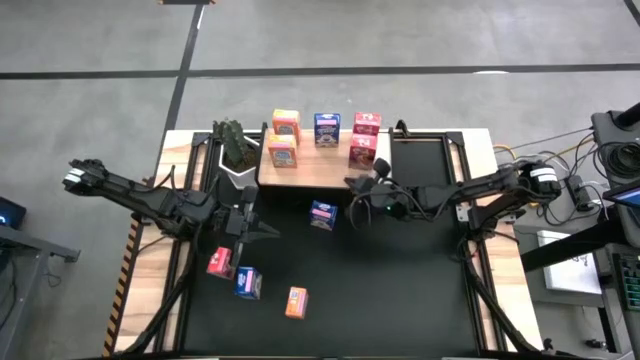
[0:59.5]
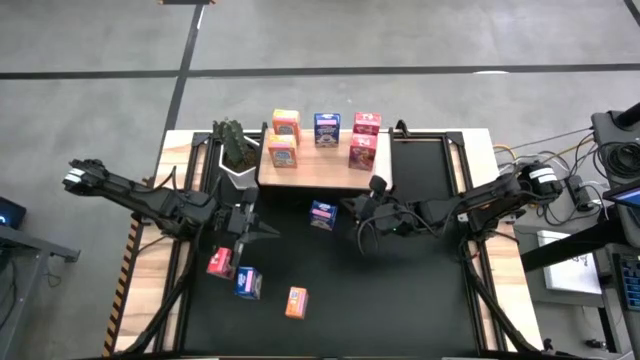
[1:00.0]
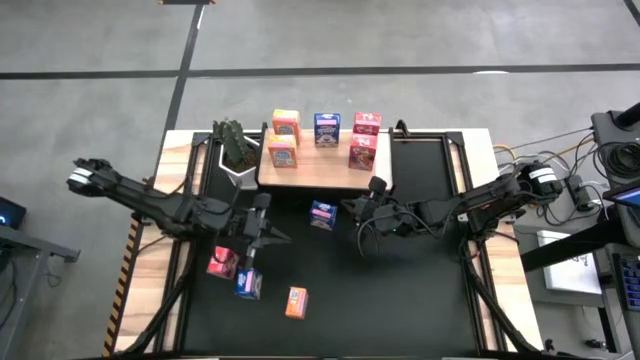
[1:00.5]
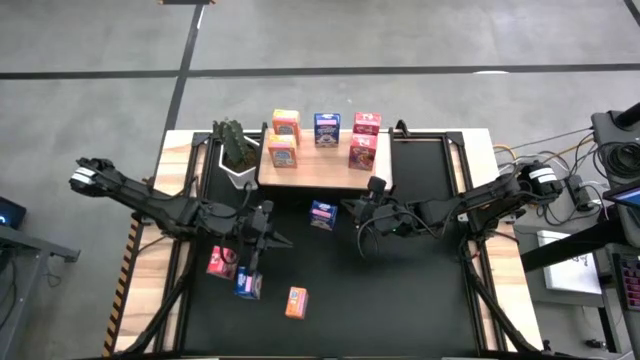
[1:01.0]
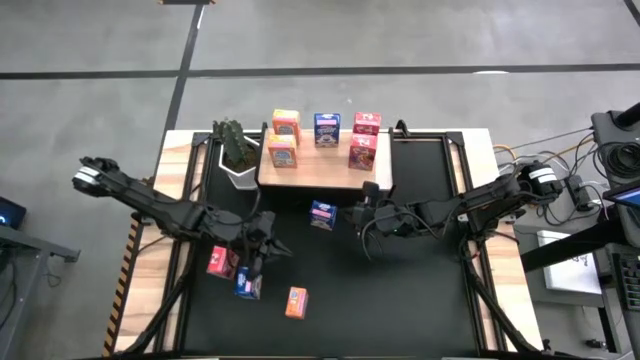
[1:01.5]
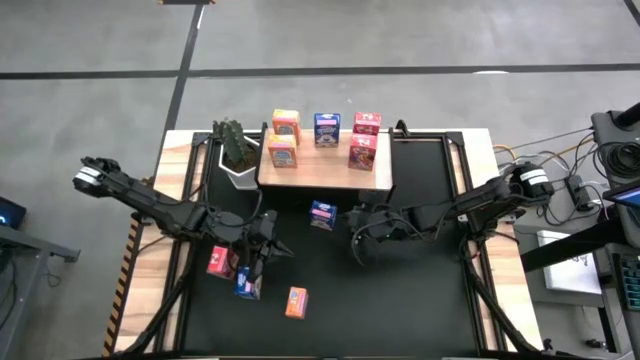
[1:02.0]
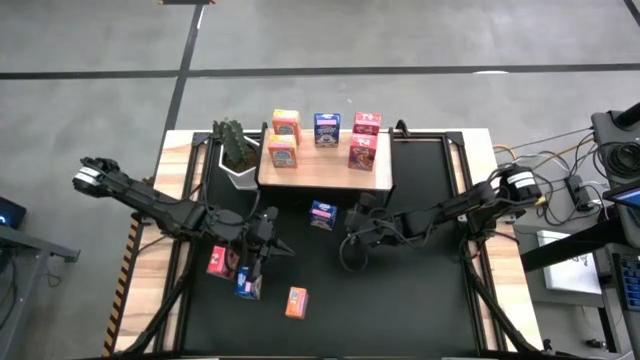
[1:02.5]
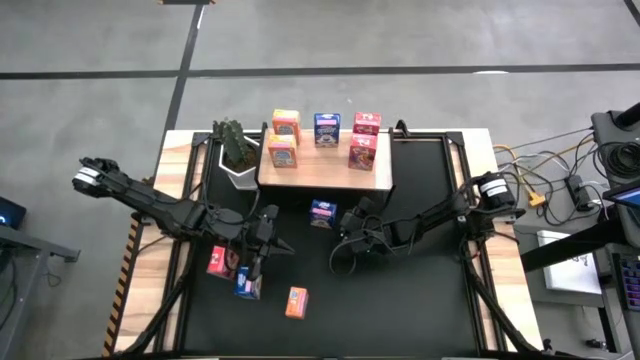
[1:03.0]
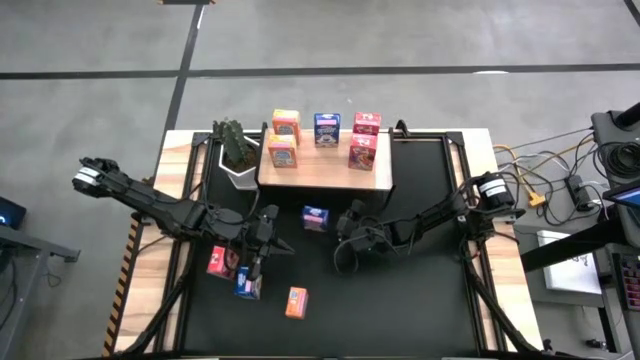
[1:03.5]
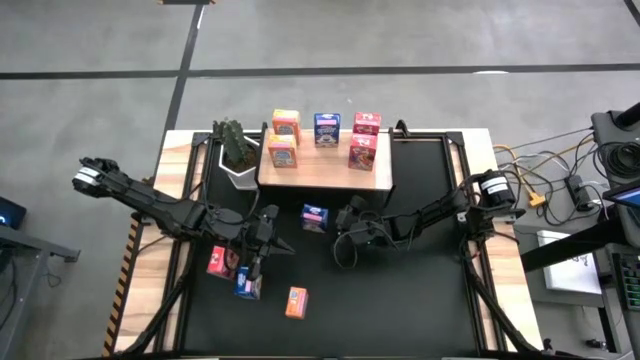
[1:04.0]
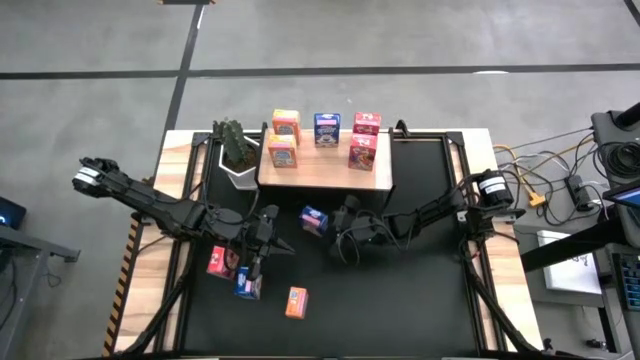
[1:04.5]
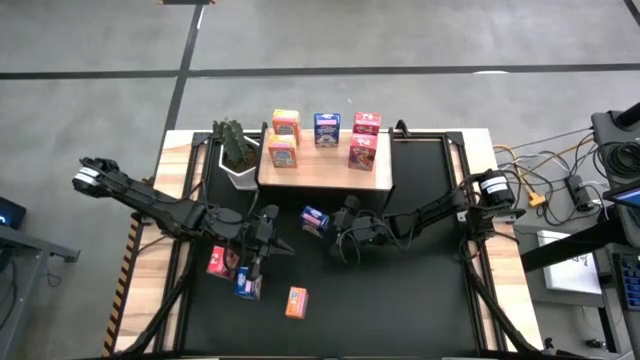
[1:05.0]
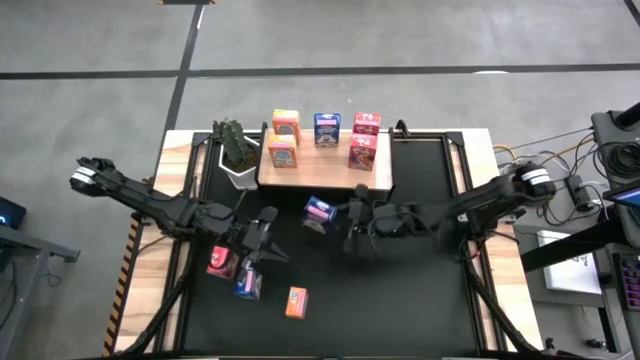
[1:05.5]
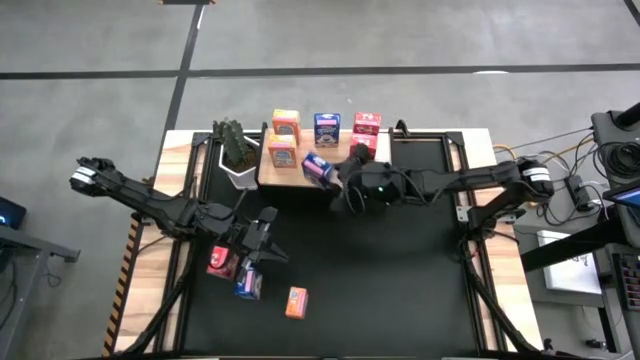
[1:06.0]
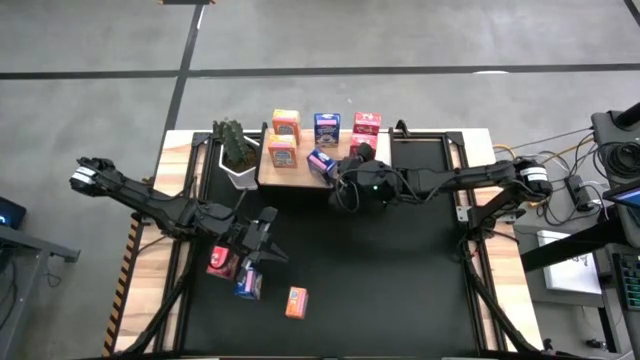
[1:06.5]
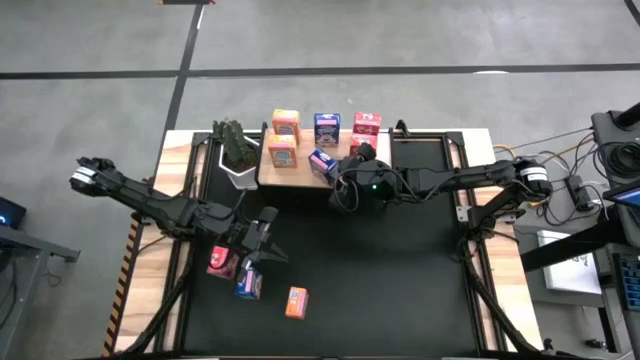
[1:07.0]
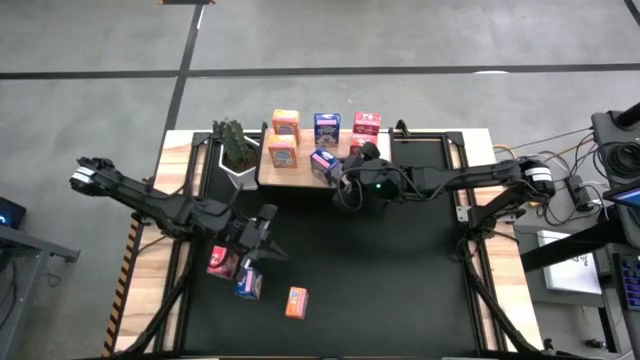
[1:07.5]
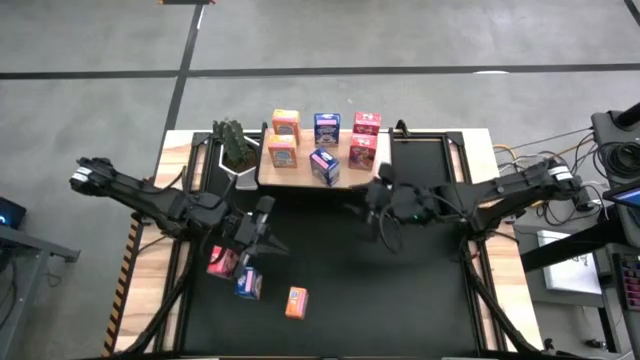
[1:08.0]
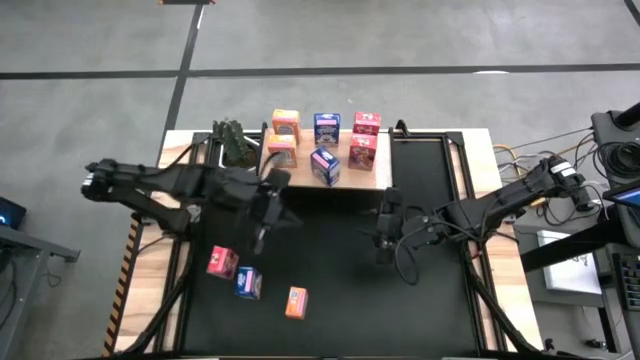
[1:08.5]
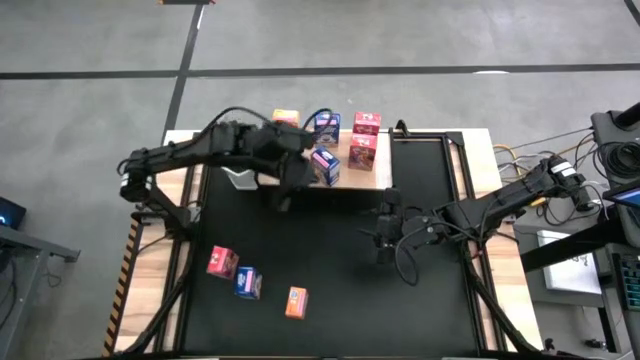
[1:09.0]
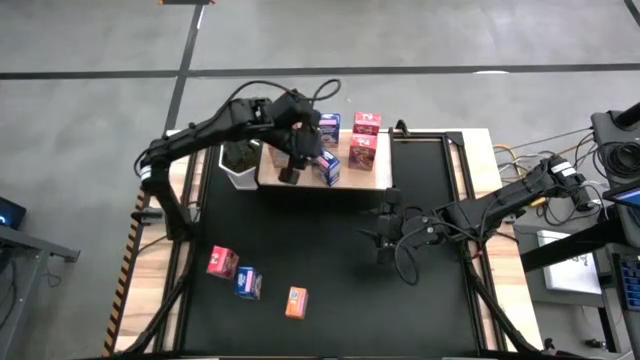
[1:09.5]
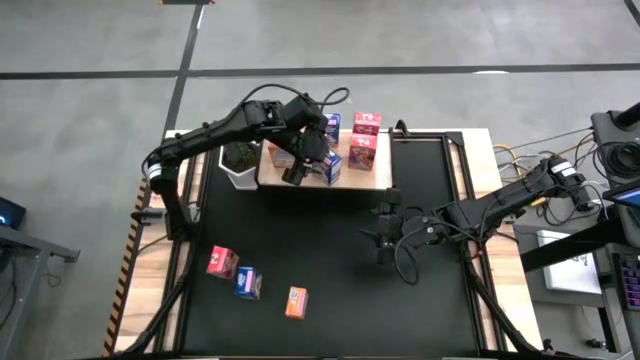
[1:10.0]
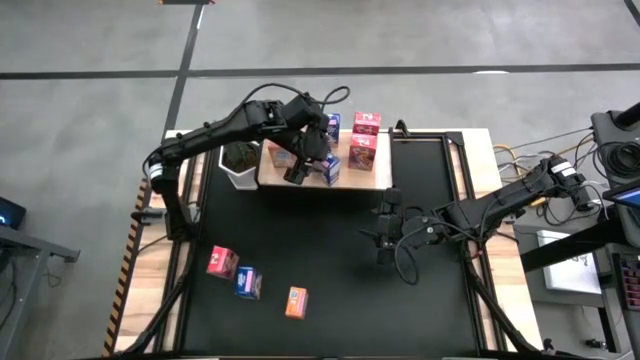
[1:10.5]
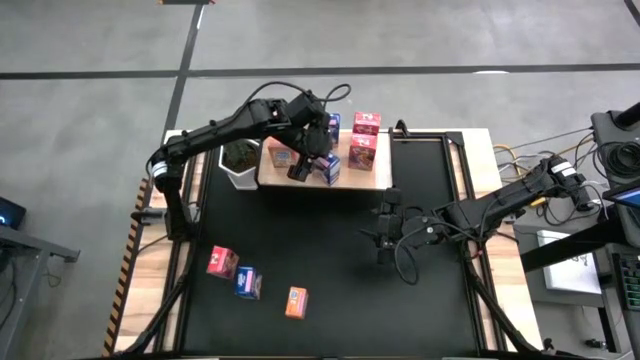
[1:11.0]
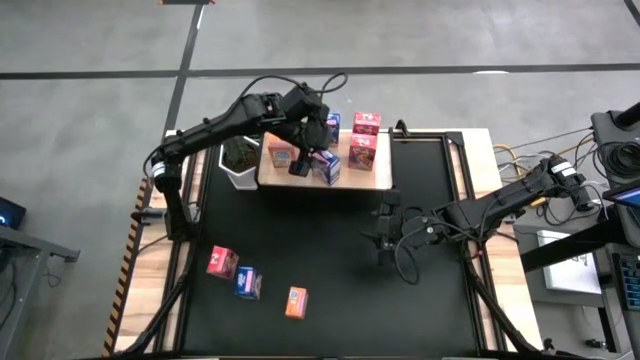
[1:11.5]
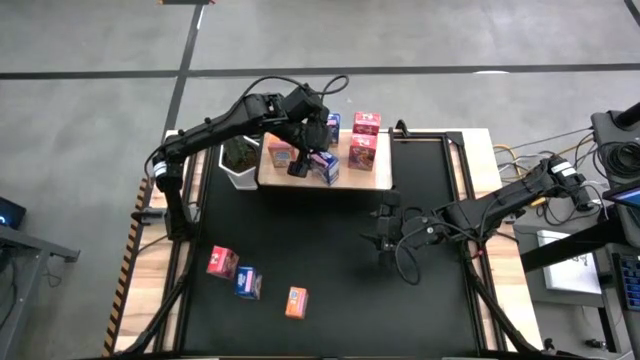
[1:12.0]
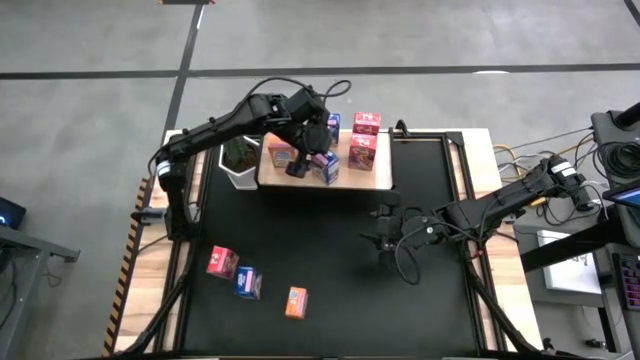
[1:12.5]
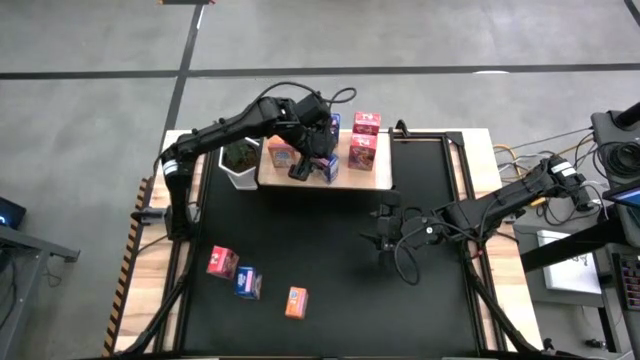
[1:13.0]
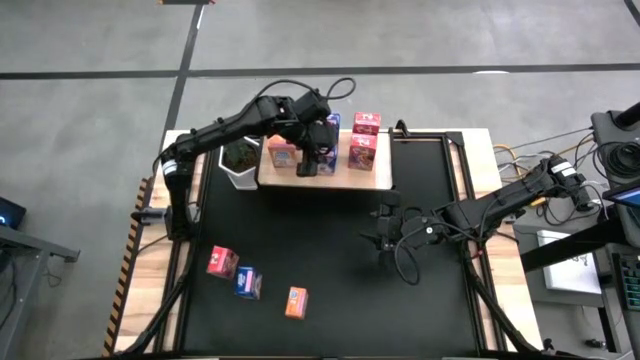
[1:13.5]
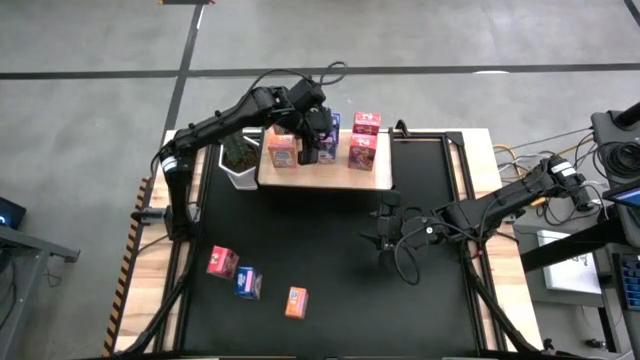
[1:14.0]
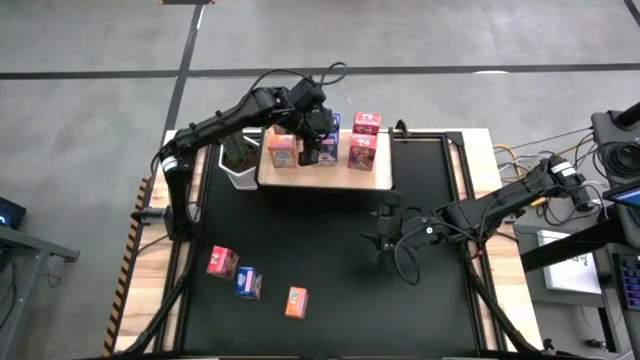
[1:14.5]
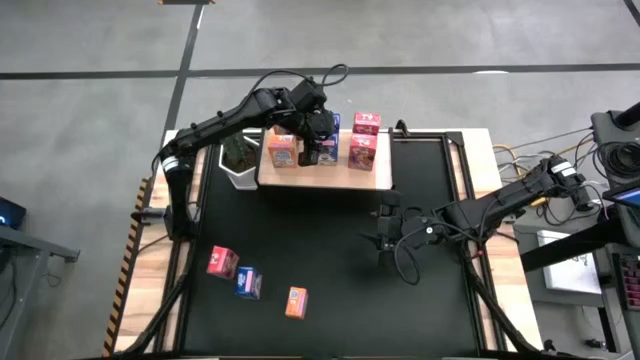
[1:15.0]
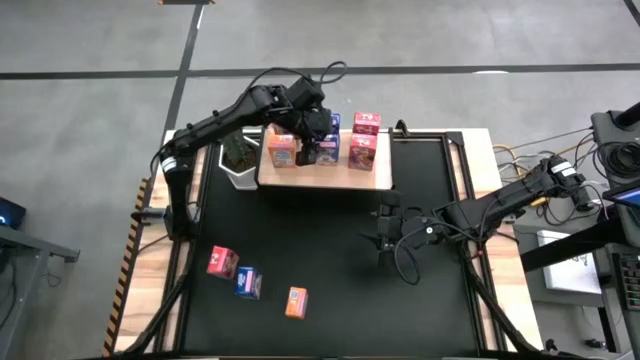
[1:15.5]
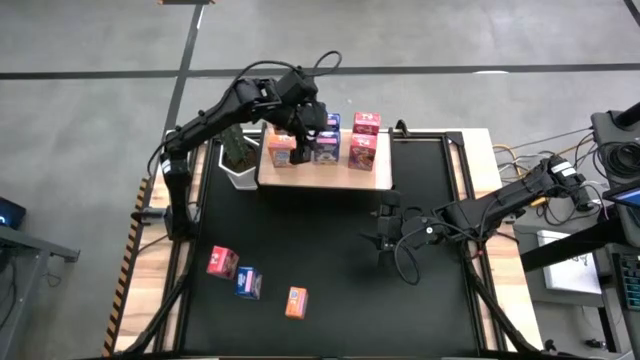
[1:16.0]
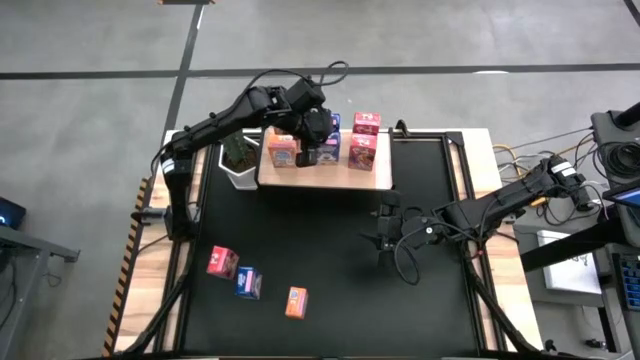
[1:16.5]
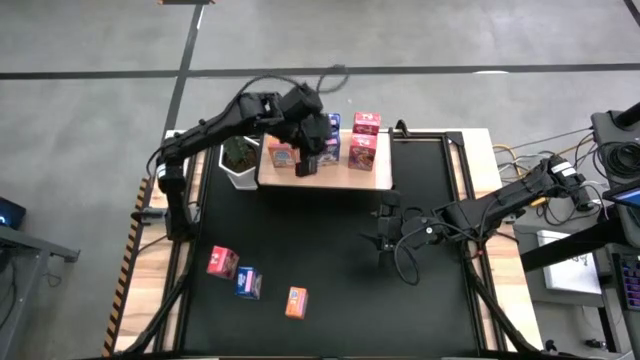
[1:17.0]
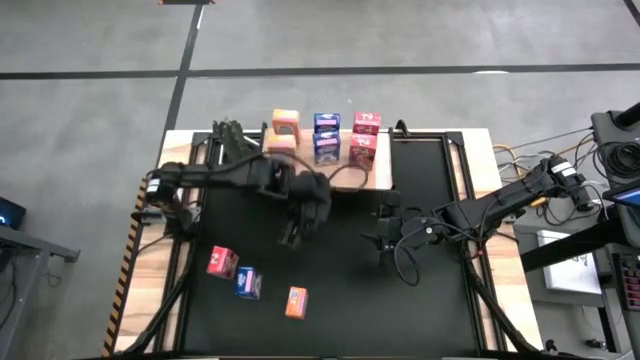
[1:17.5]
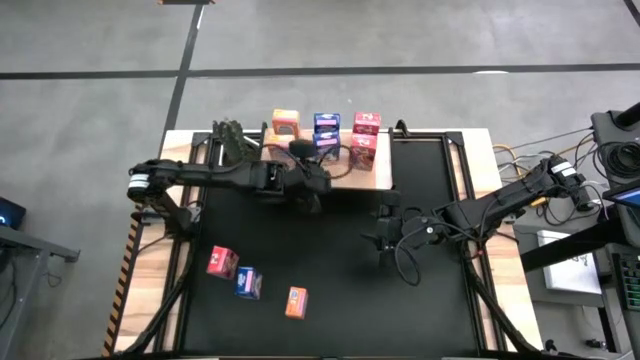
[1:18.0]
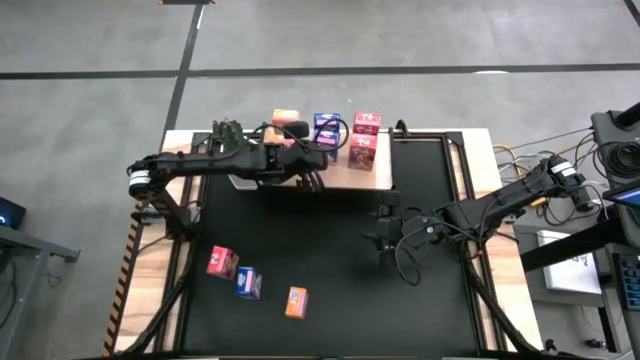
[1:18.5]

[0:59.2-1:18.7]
Task: Stack cereal on shelf
Put the top blue cereal box on the shelf aligned with the other blue cereal box

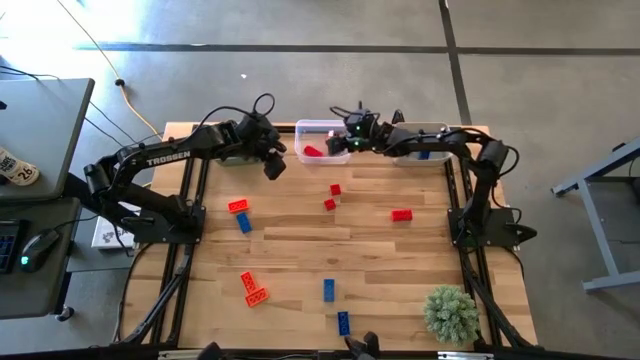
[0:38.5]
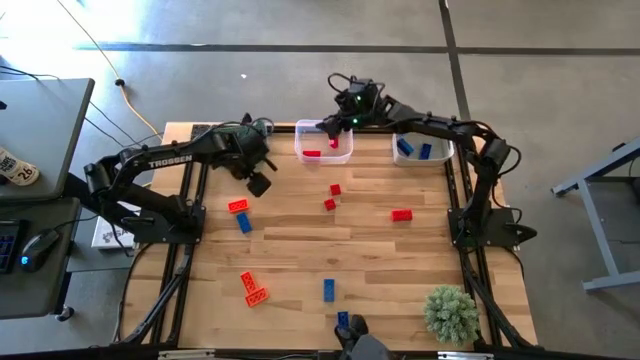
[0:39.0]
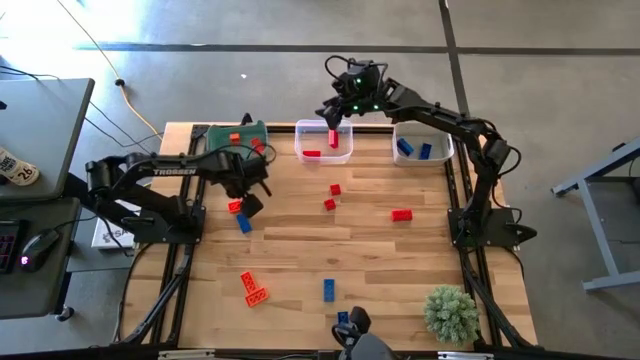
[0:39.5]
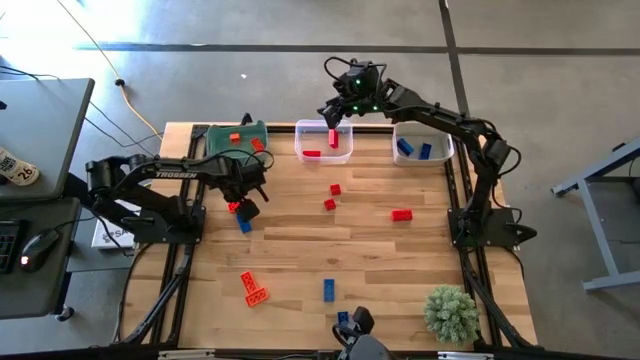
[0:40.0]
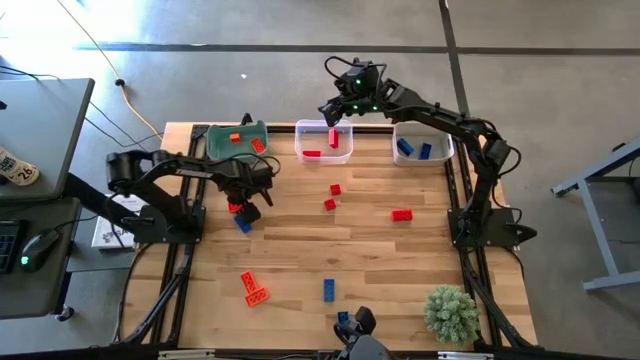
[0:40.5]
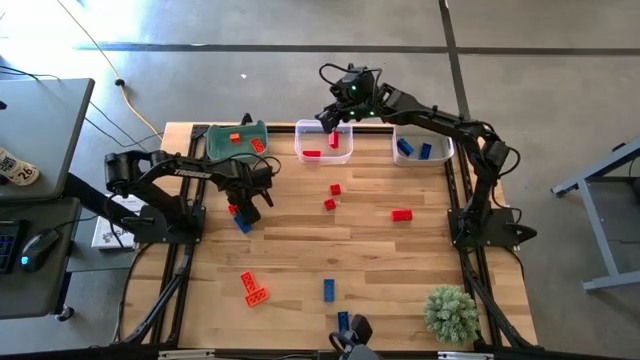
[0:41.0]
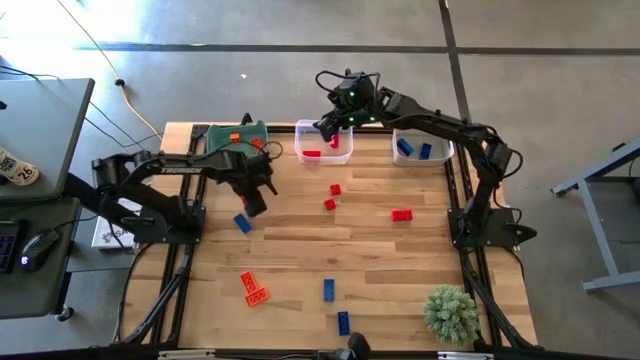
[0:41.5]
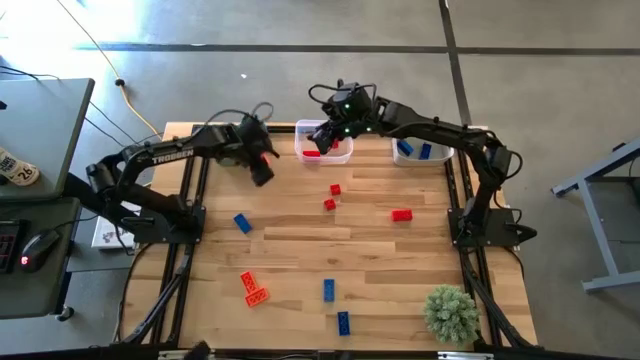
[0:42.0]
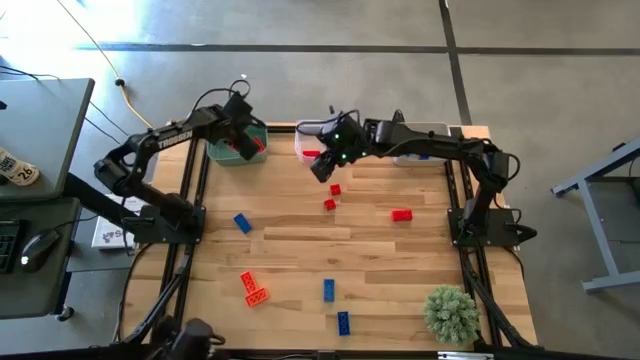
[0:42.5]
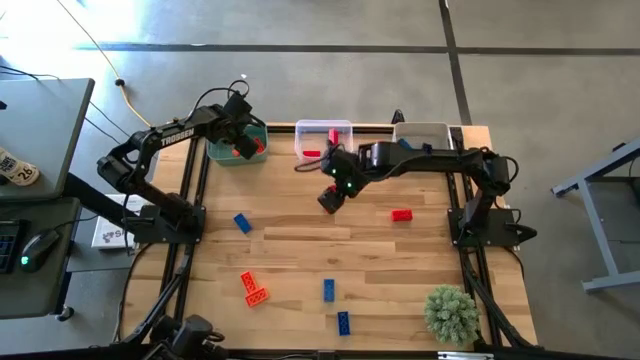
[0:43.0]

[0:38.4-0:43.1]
Task: Sort & place blocks by color
Put the orange game piece into the green bin
